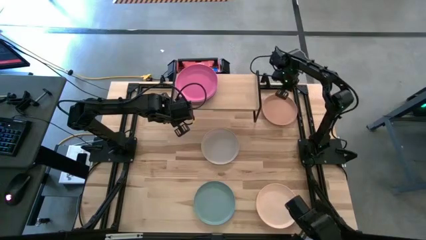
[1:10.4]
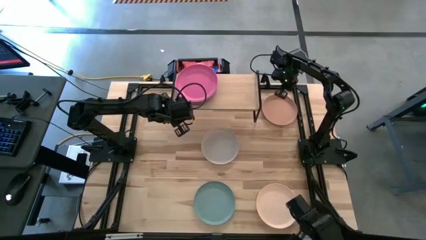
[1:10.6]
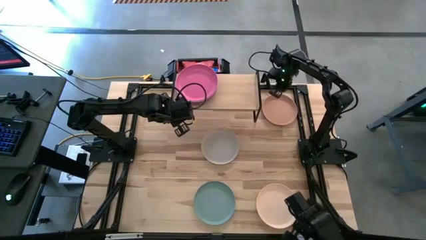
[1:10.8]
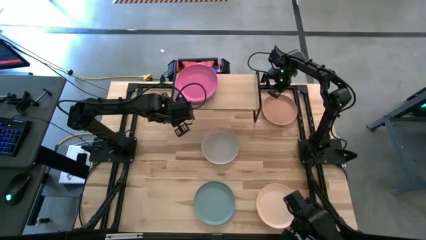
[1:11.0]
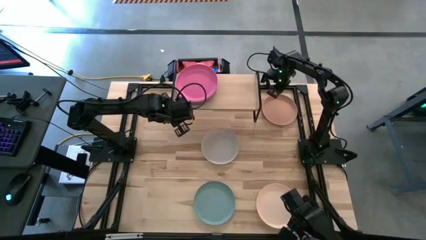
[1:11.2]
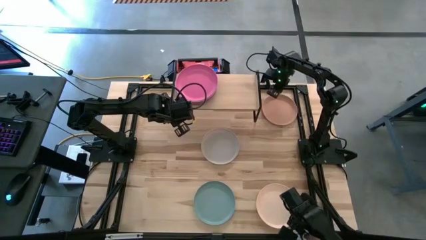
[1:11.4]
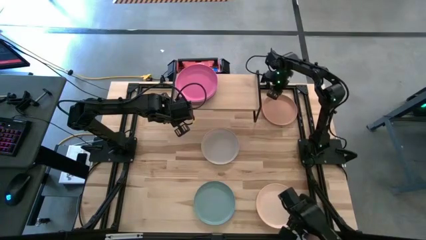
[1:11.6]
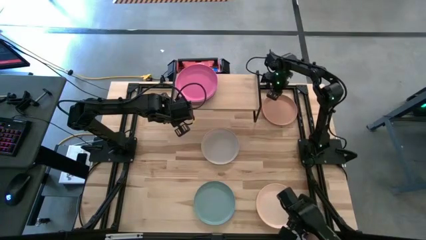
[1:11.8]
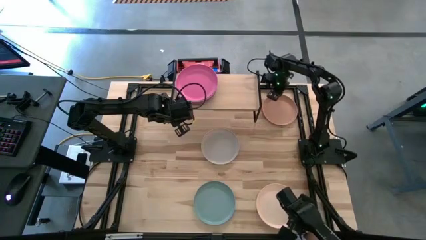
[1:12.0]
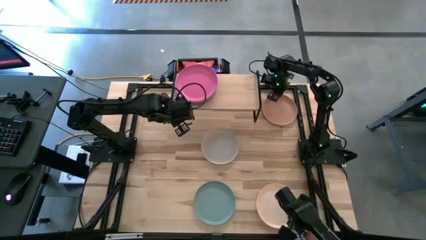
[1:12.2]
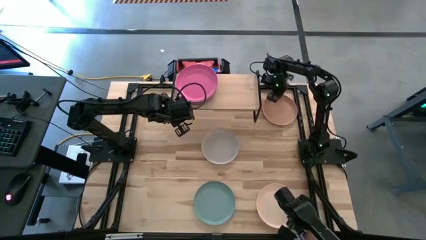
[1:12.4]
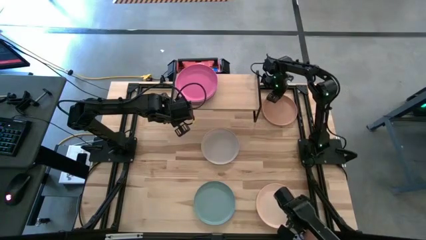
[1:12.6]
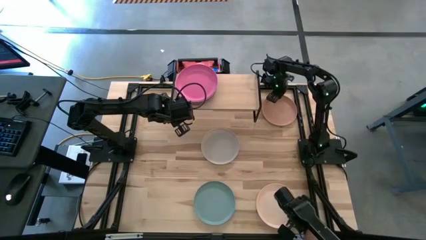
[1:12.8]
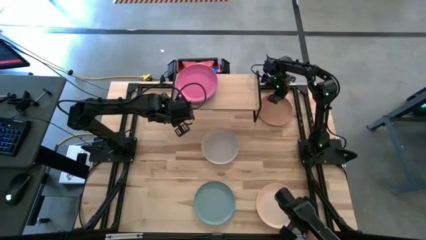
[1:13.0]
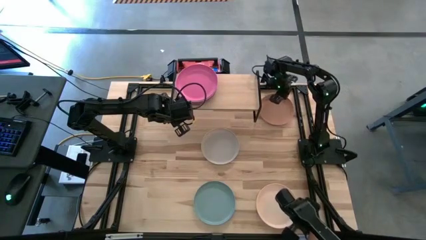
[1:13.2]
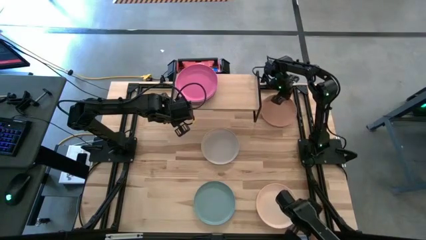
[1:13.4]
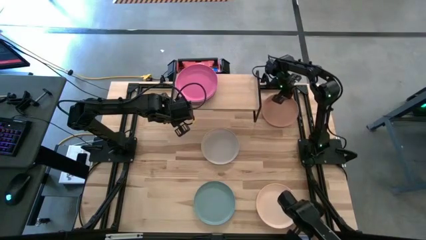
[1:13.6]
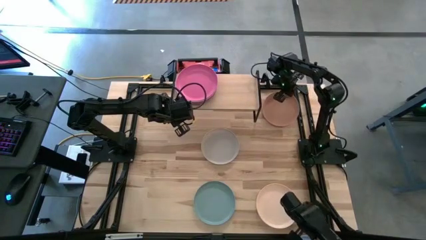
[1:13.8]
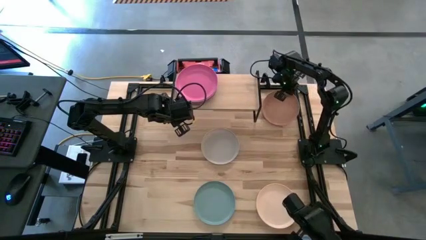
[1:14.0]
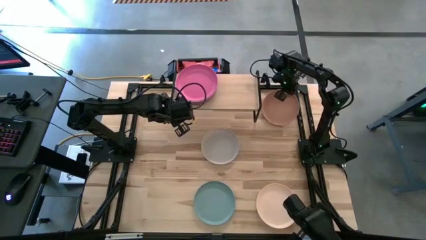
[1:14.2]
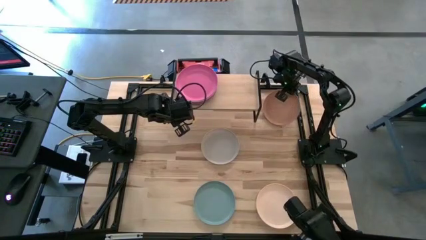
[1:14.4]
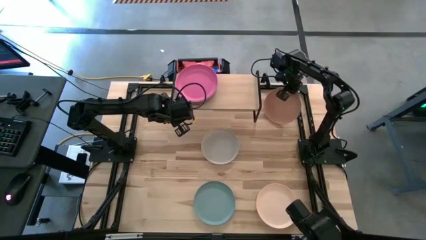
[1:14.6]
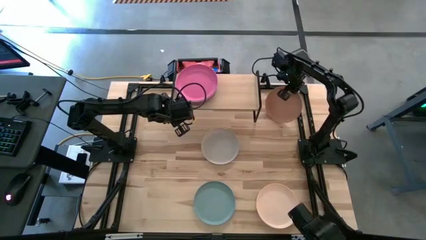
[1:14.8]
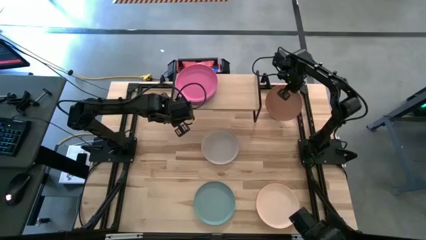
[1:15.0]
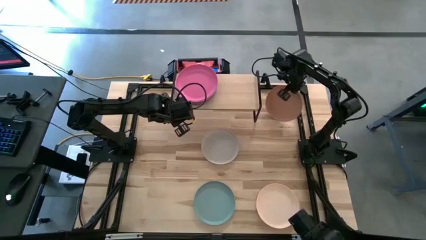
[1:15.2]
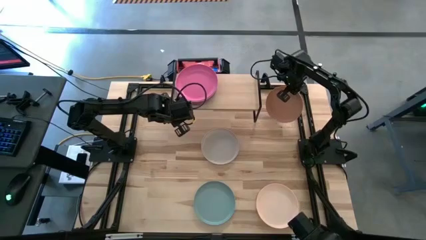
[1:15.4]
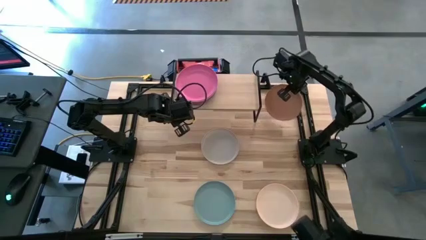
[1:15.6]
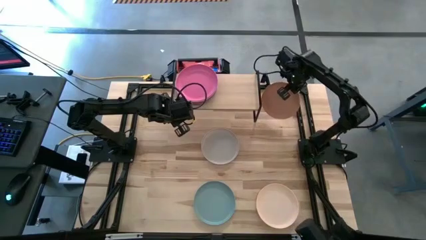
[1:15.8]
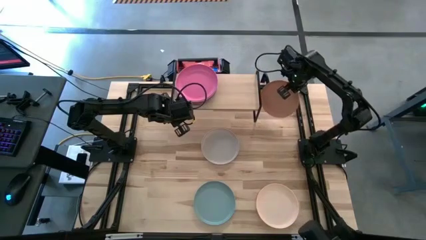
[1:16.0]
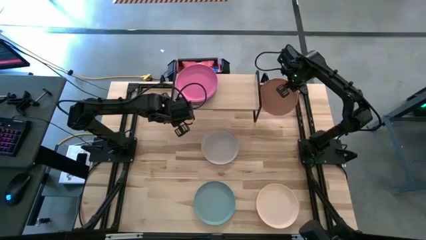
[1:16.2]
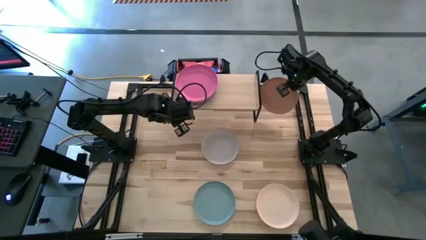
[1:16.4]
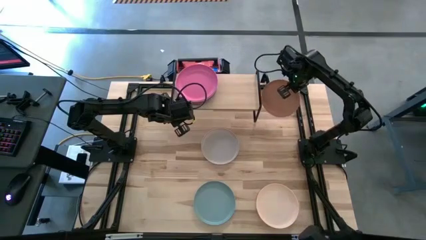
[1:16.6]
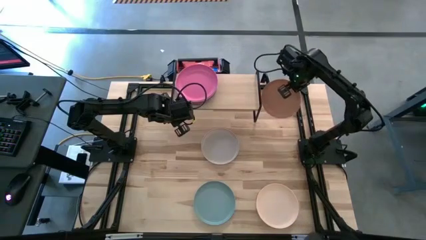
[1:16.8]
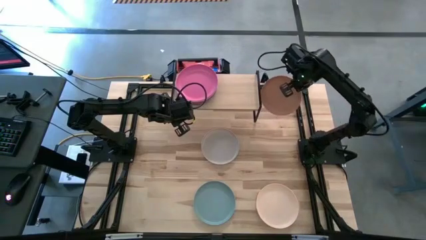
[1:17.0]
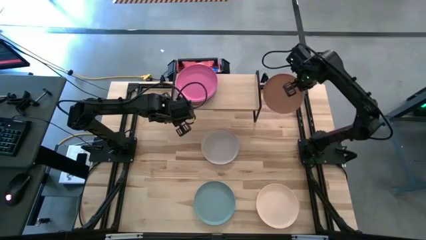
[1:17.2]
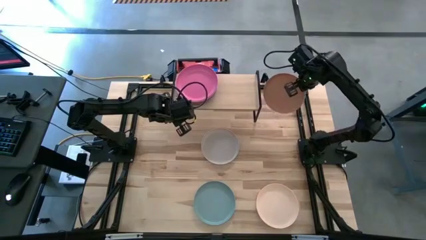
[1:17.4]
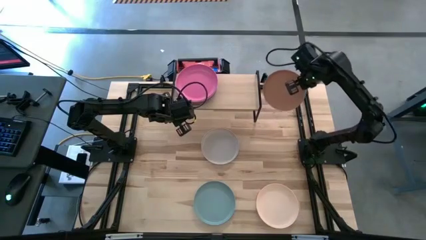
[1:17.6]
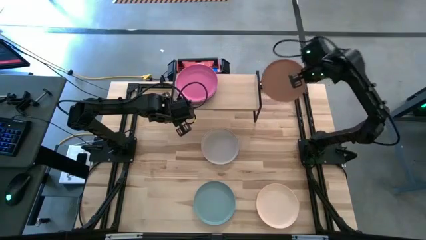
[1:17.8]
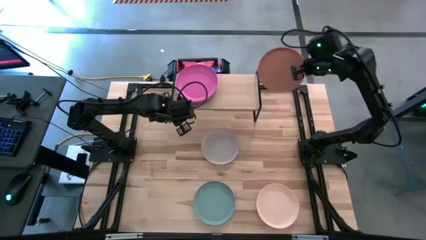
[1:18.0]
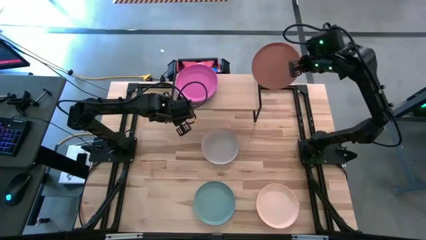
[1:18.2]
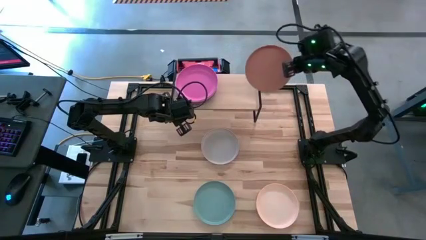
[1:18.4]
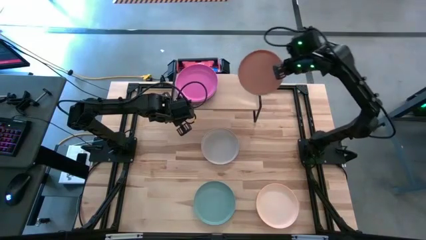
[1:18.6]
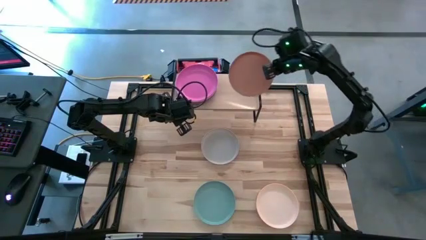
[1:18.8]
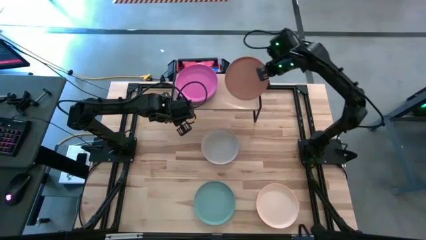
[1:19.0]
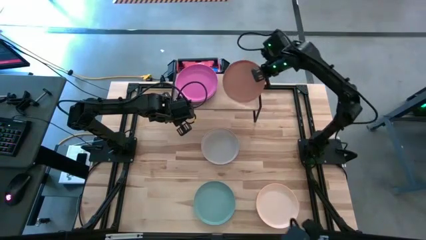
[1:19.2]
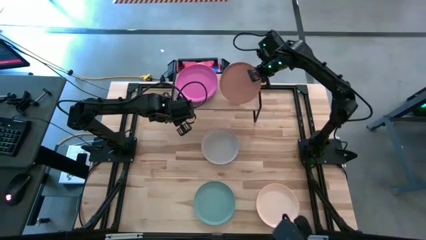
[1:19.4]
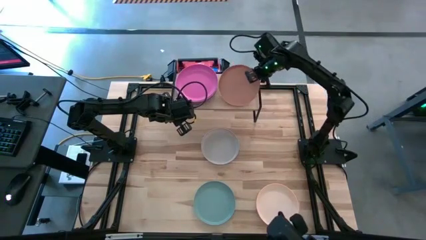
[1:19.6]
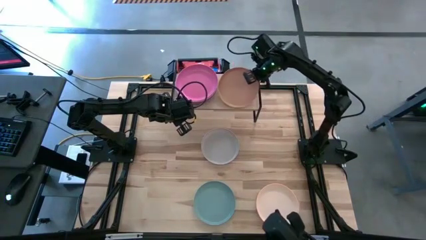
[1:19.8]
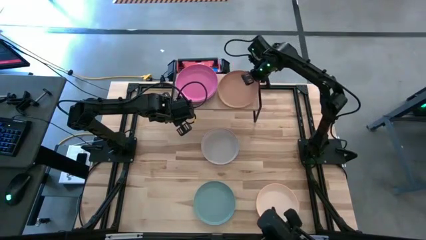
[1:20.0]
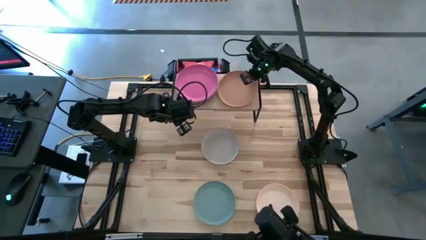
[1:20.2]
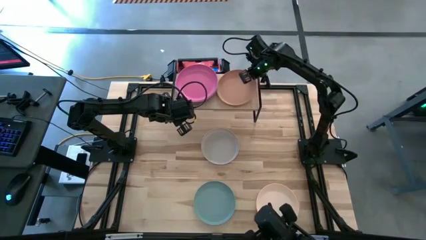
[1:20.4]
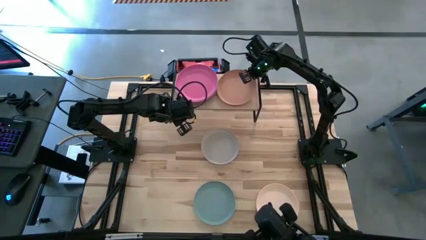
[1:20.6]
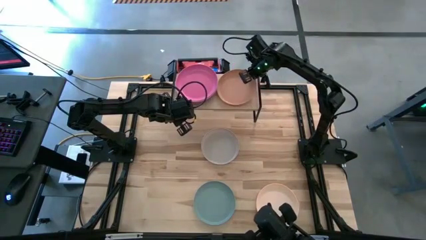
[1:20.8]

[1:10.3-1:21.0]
Task: Place and stack plates onto a shelf
Put the brown plate on the shelf

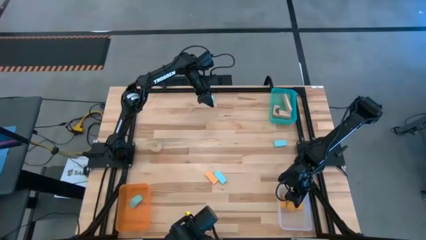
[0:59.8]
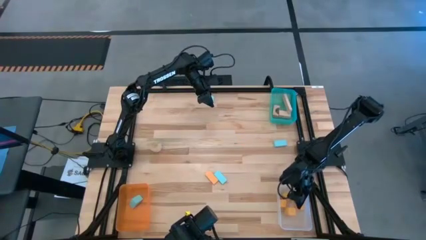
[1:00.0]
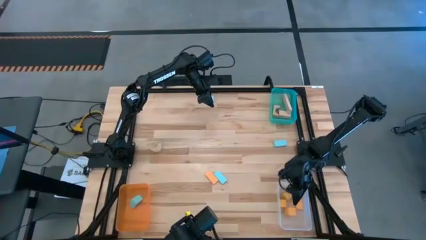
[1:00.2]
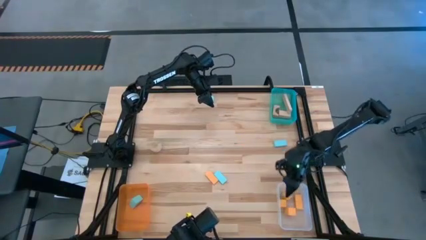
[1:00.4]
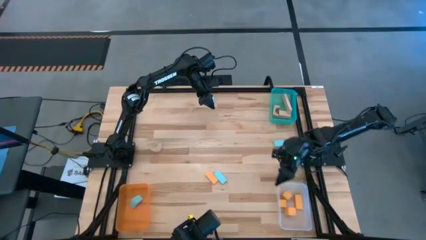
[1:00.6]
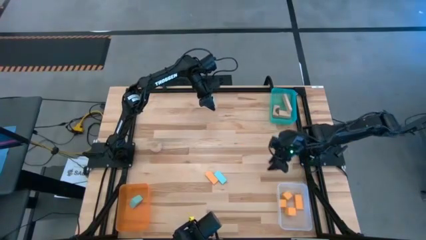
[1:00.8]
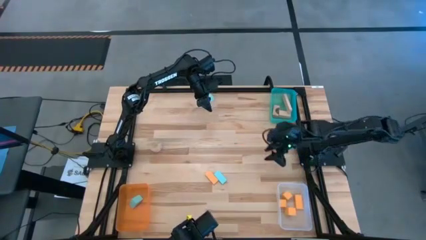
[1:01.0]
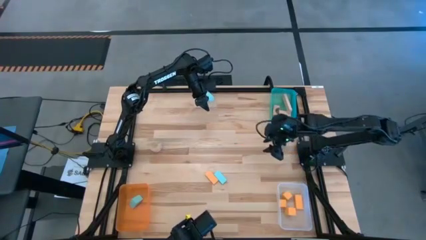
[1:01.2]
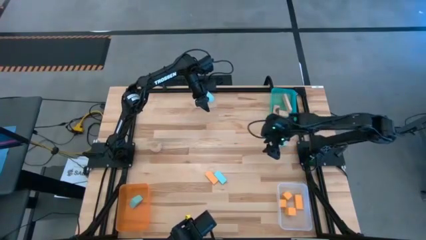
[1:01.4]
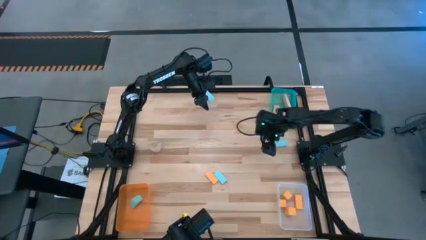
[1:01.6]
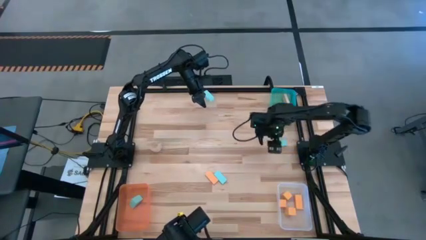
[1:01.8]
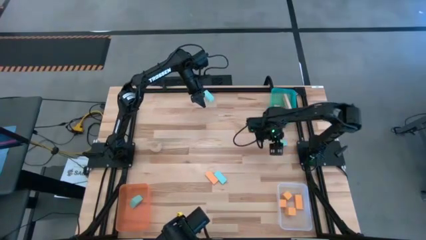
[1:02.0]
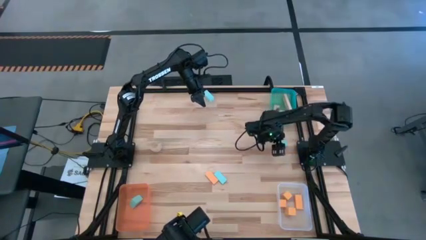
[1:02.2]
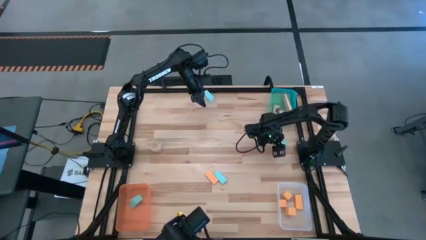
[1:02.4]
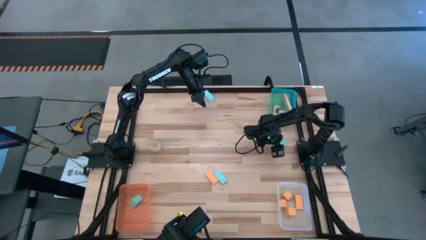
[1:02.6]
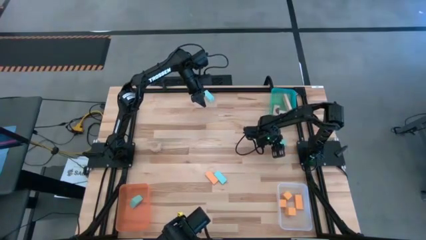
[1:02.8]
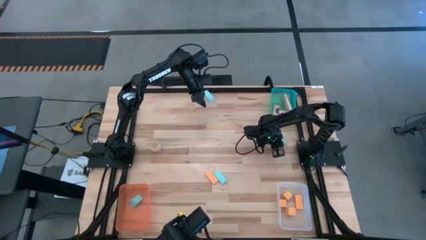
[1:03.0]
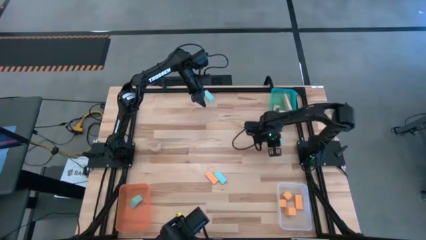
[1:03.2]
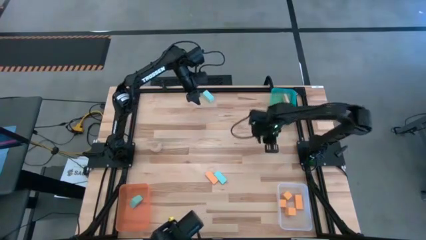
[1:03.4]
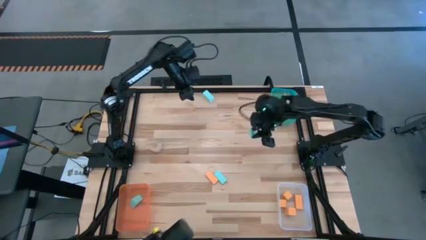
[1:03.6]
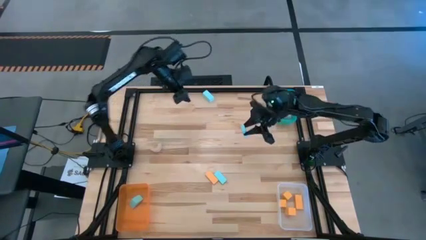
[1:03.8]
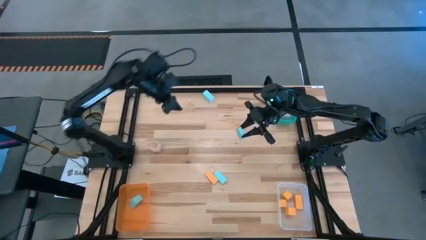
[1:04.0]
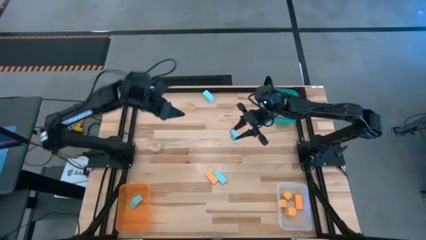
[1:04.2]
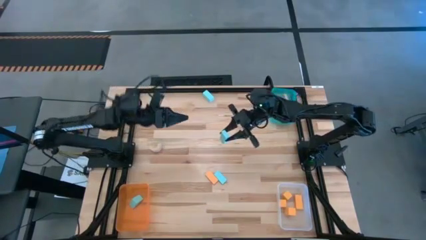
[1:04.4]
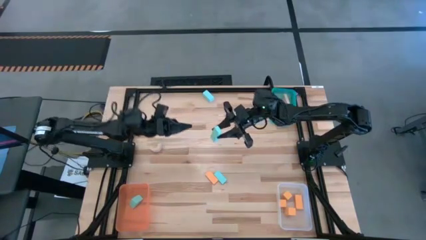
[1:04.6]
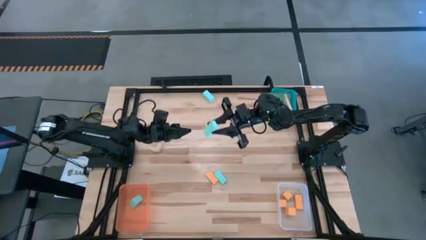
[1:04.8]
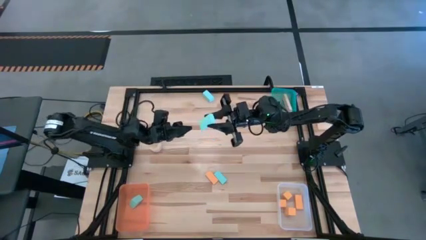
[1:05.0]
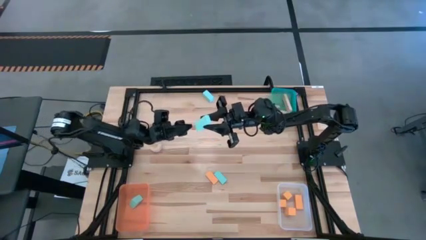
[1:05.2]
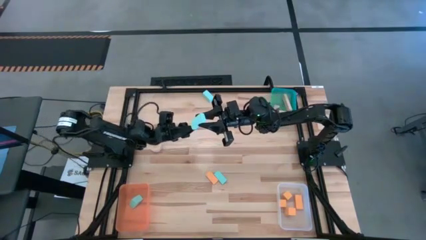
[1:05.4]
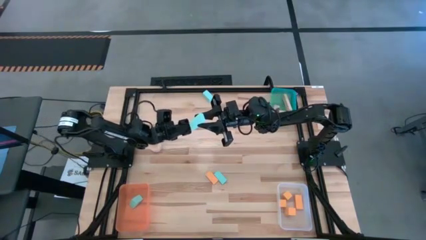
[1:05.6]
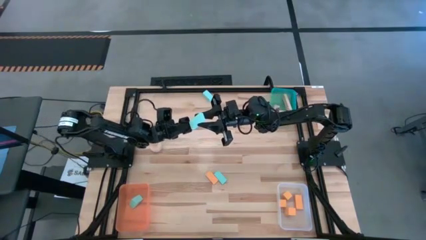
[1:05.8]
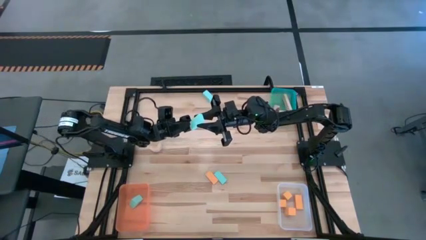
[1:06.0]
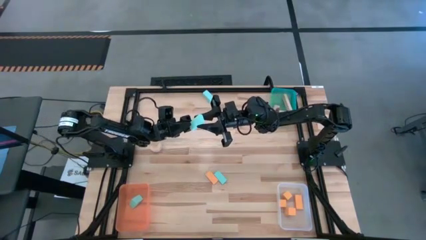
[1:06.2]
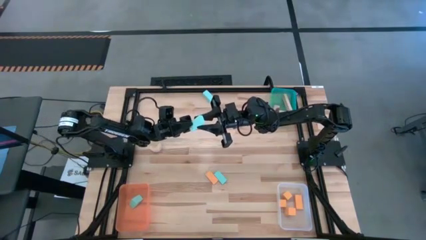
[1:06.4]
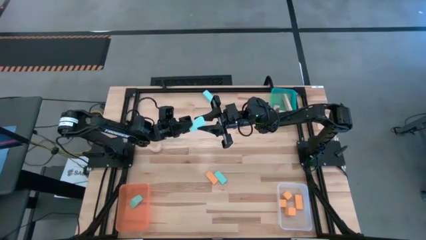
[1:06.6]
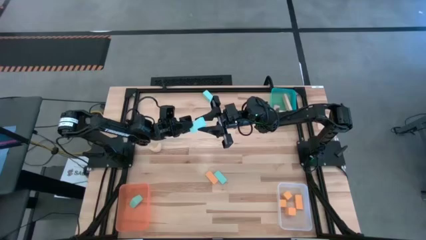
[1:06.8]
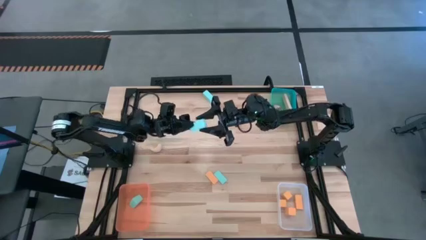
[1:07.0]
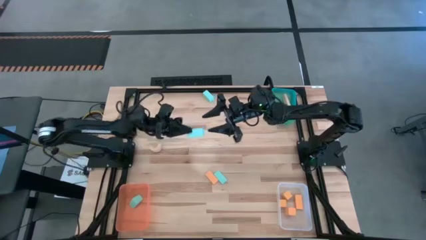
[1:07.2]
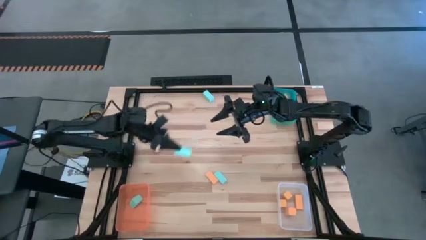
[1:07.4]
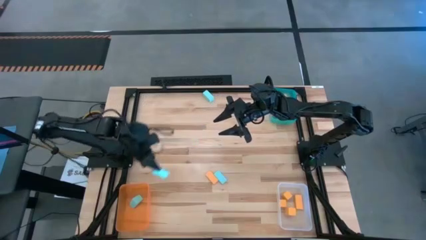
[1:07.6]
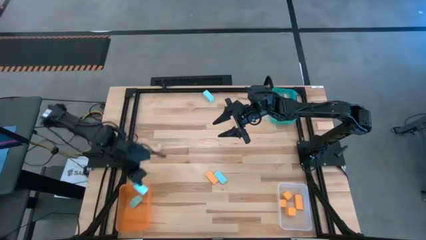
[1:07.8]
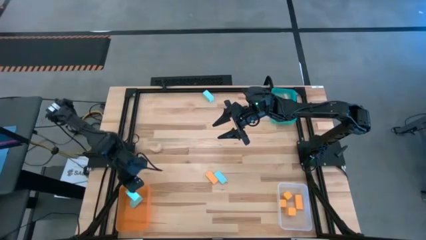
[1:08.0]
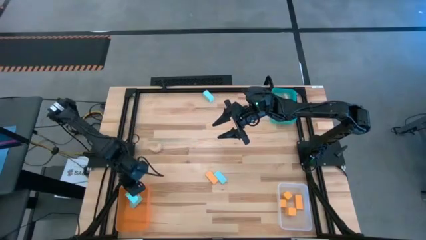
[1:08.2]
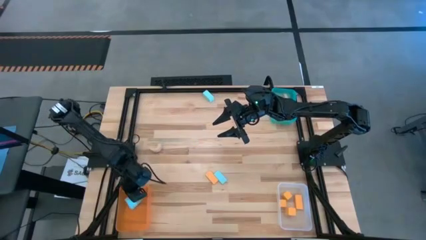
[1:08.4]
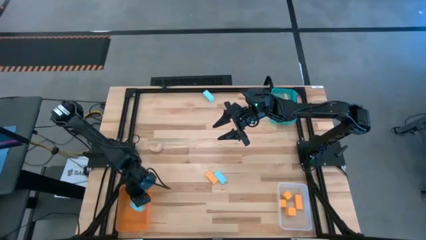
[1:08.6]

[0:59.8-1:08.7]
Task: Sort & place blocks by color
Put the blue block into the orange bin
